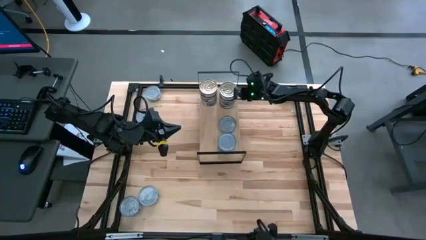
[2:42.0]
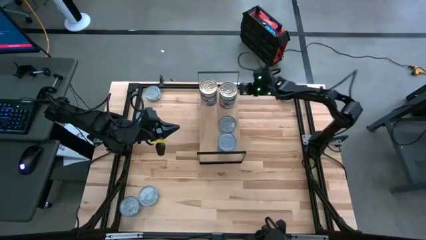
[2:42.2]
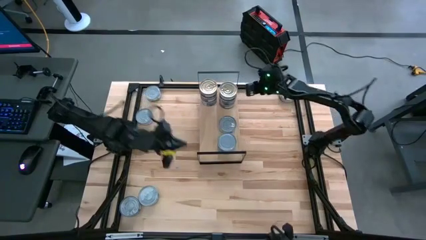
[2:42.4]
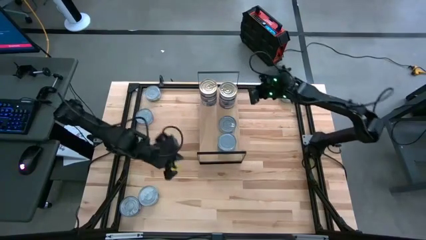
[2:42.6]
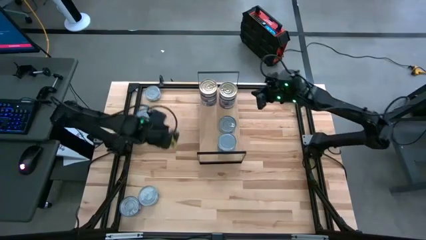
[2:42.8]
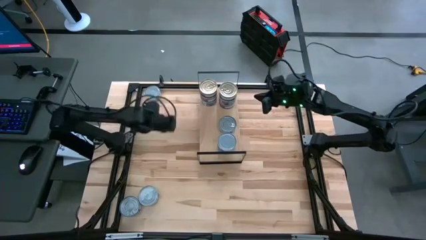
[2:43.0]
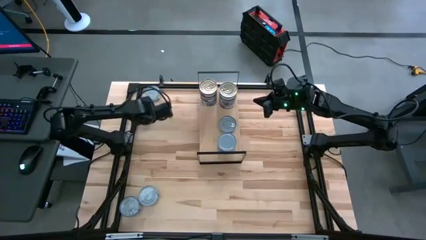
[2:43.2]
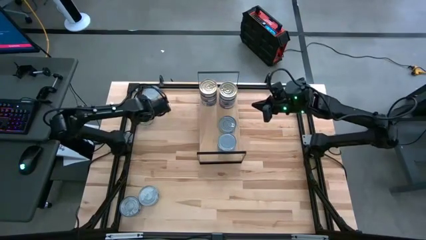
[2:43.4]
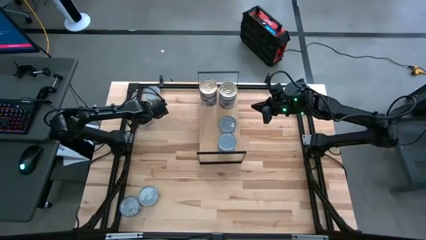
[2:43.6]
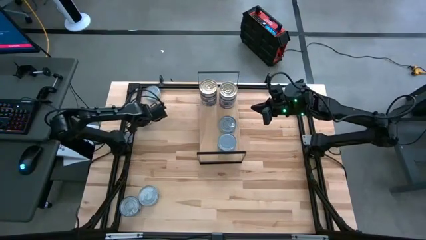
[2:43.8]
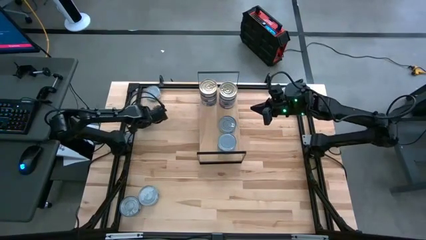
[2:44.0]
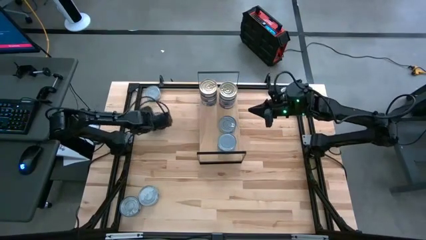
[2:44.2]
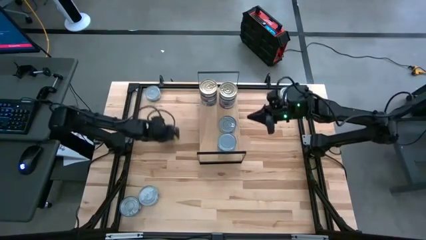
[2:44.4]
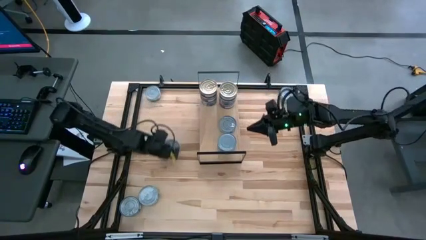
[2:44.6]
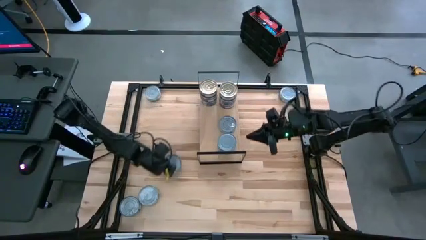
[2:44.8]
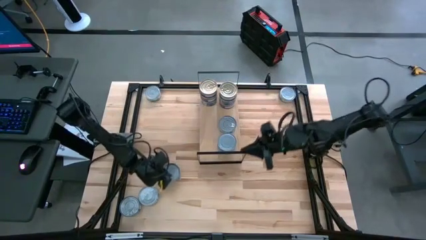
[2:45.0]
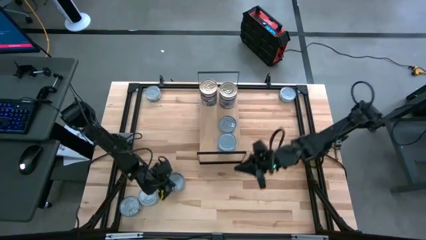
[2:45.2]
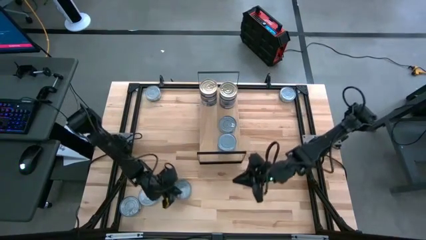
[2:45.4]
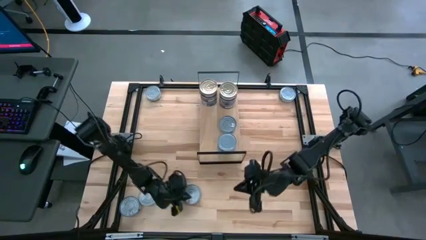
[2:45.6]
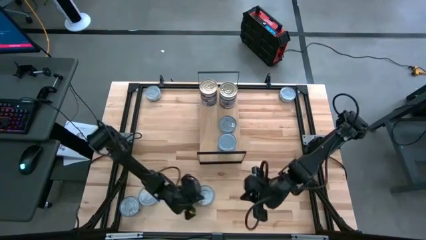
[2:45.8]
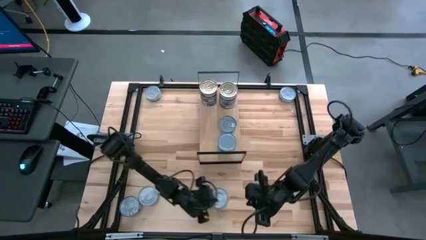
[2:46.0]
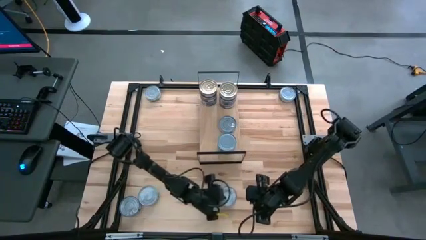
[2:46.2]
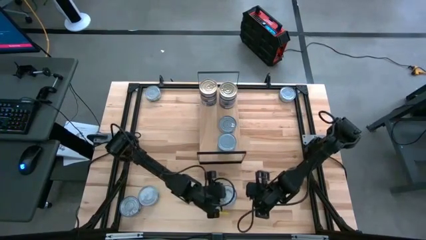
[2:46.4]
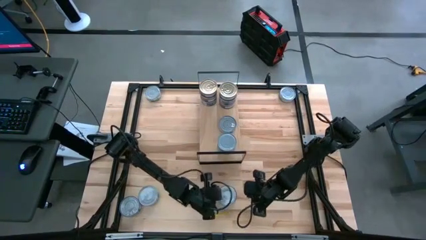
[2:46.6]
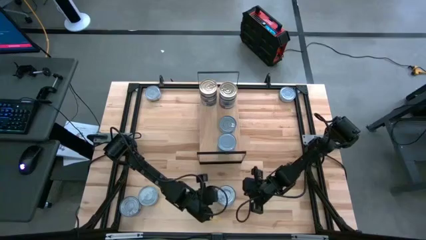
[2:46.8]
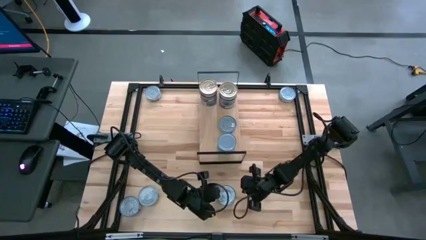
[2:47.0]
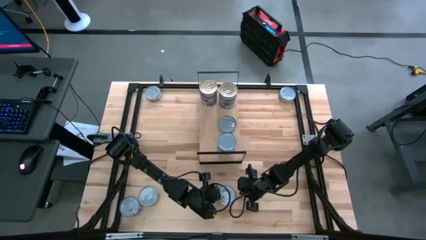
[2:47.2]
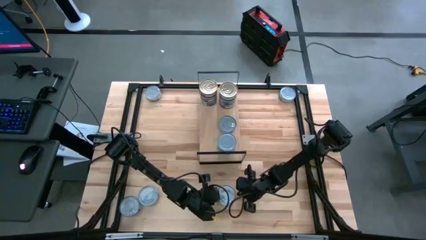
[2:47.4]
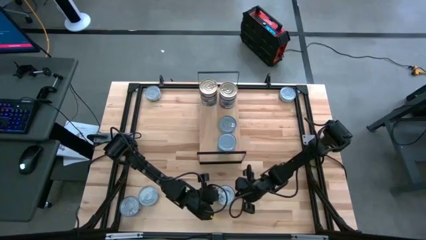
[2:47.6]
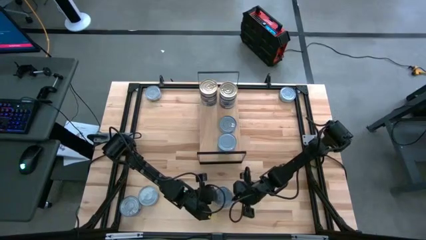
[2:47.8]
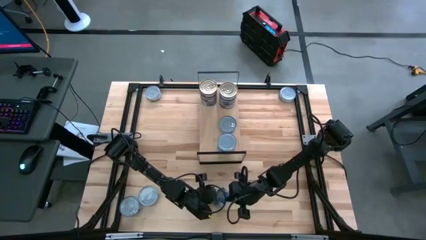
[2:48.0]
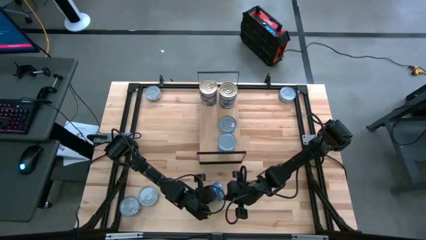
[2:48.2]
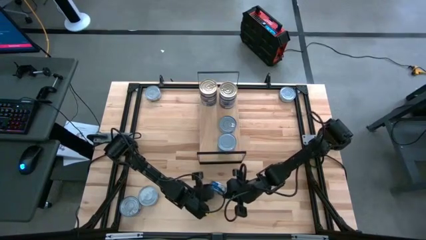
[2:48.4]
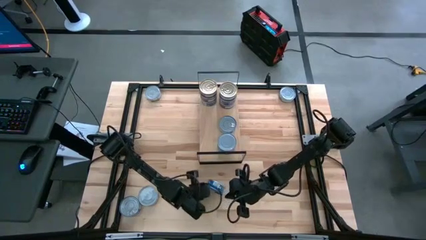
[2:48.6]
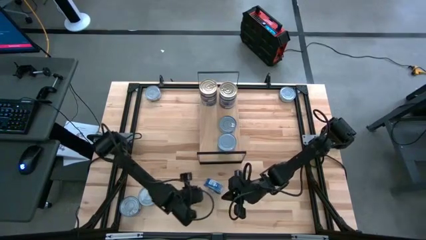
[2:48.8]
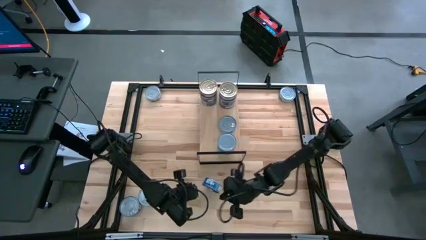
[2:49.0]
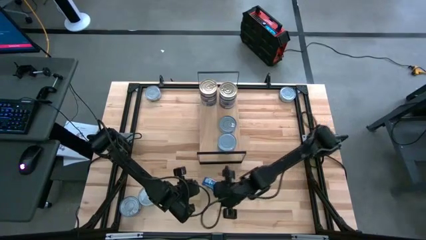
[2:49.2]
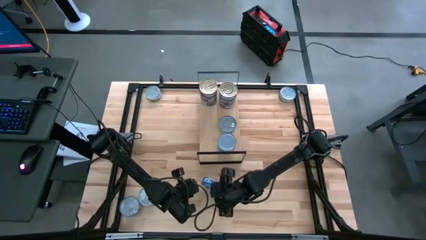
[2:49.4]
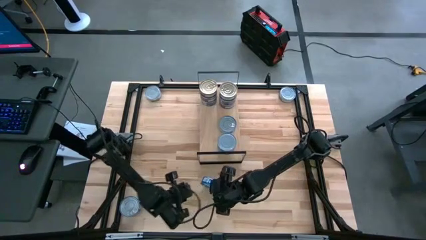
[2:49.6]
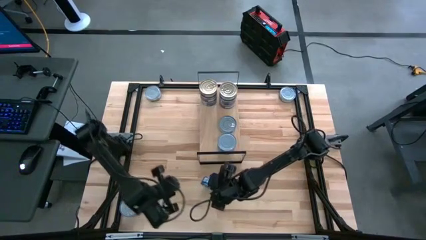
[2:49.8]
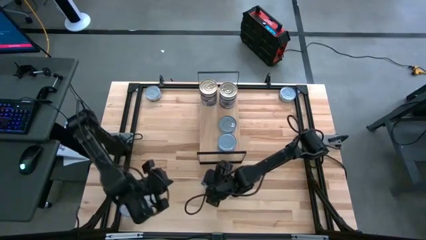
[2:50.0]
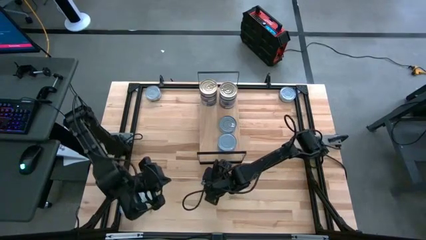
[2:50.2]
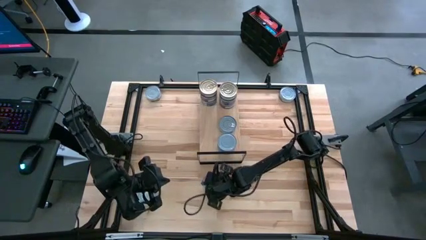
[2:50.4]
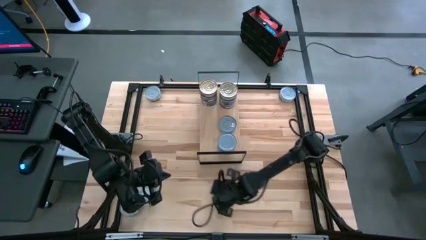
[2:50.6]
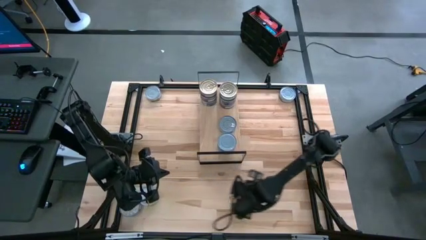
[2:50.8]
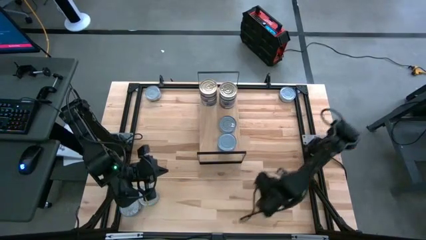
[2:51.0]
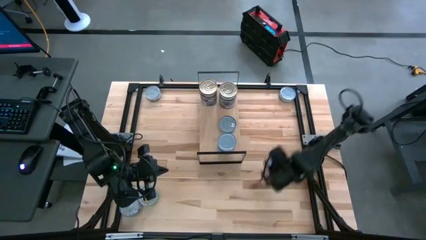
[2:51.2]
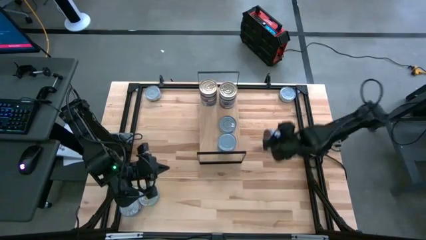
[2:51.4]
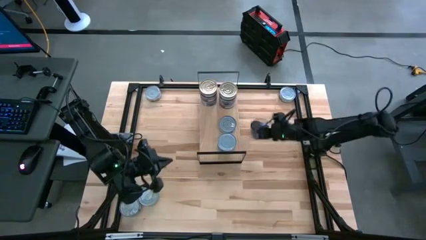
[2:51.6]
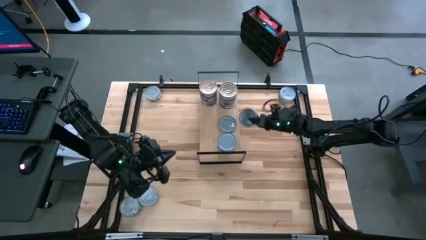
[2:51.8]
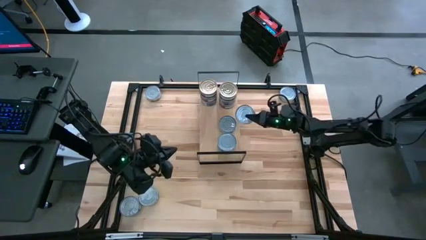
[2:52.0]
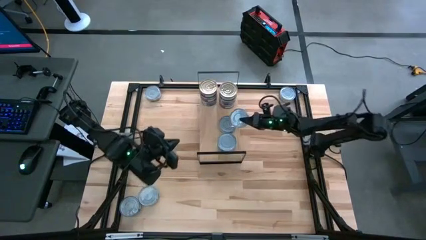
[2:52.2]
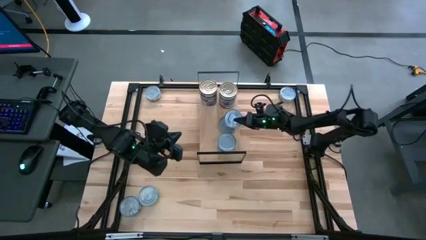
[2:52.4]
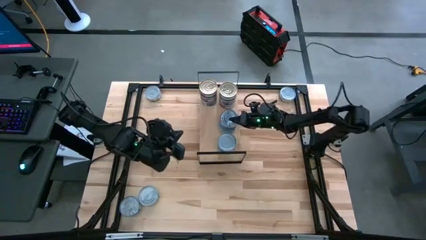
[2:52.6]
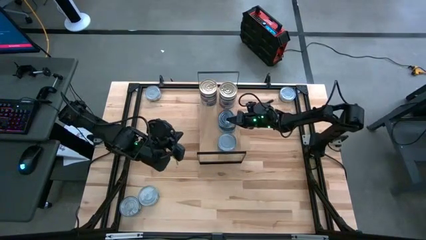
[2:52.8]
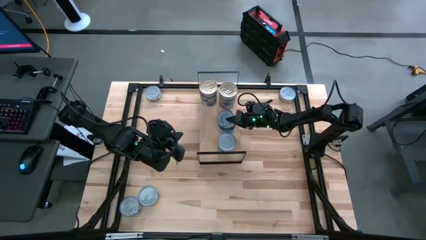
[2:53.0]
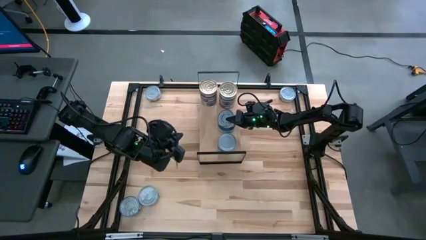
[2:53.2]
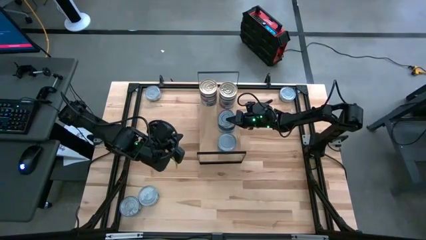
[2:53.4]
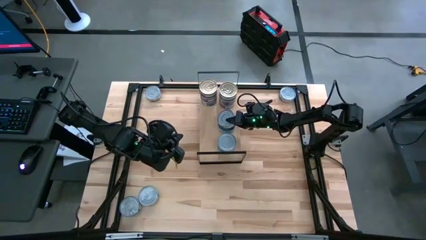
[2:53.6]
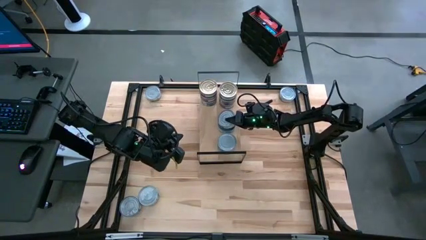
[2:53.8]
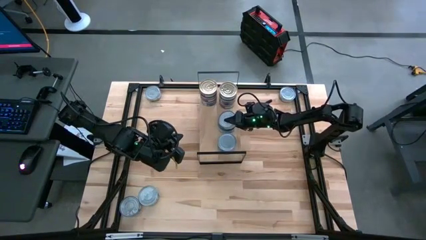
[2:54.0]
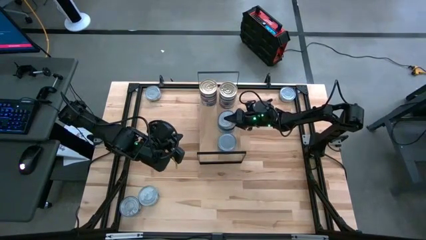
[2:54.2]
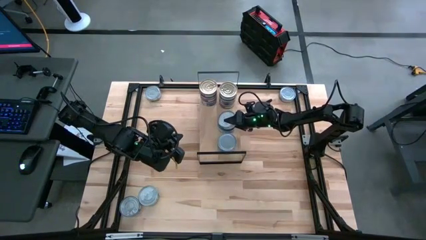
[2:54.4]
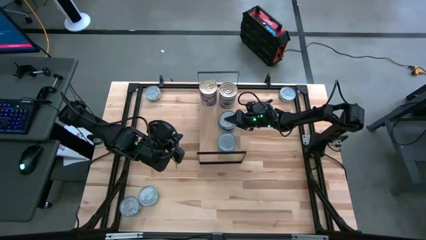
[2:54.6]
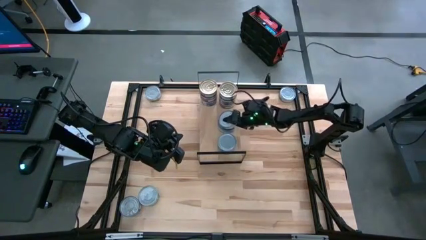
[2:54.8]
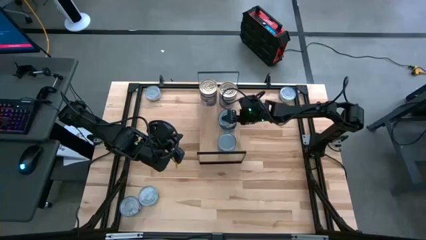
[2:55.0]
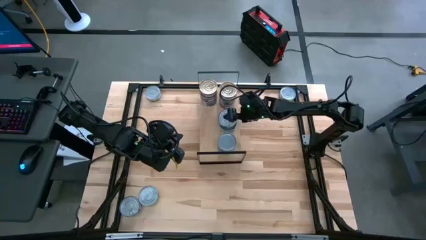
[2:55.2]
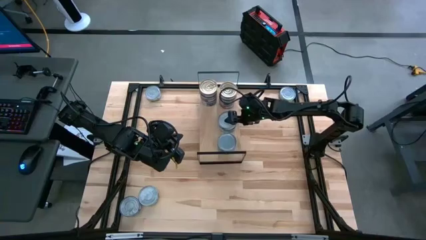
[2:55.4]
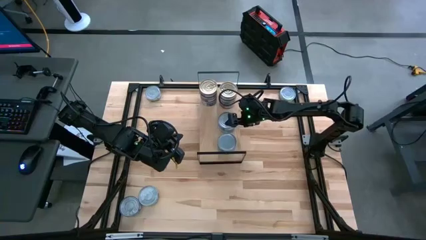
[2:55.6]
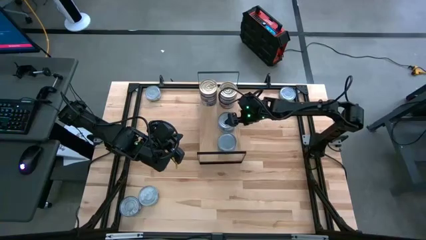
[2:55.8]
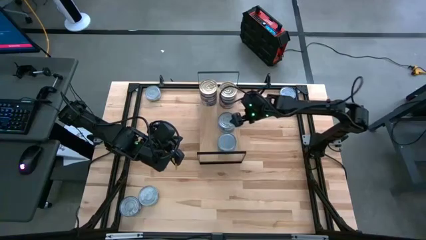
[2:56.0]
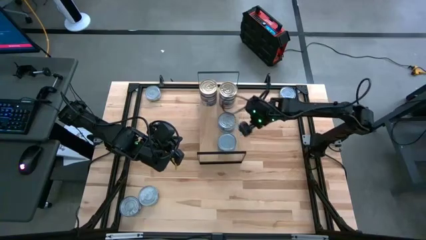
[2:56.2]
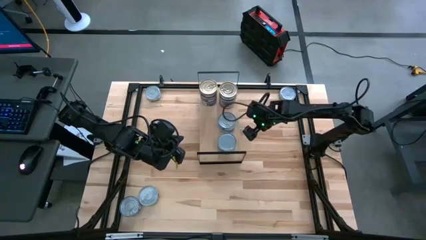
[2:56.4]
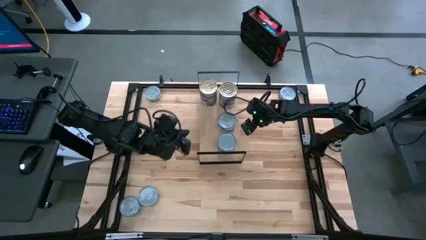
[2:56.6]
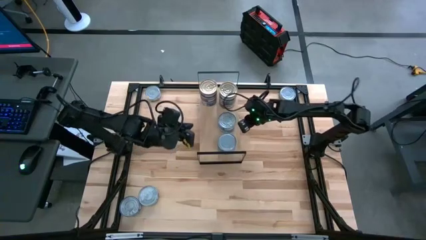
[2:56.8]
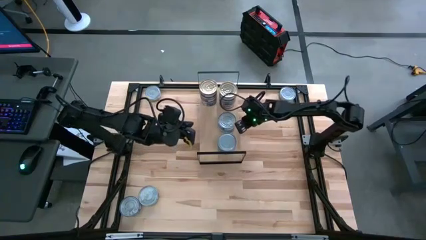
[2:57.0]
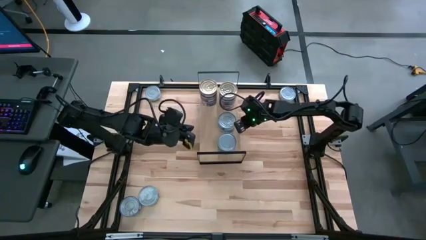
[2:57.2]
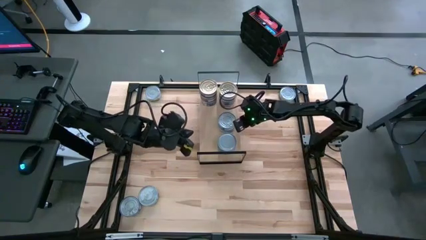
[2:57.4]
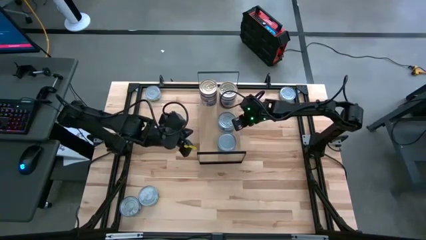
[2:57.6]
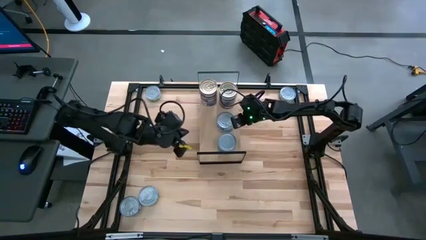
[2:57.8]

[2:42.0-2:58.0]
Task: Stack canned seafood by type on shelf
Stack the blue tuna can on top of the other blue tuna can on the shelf
